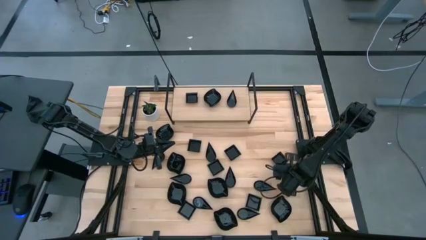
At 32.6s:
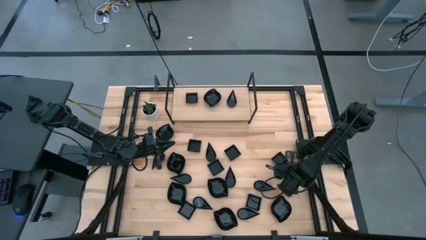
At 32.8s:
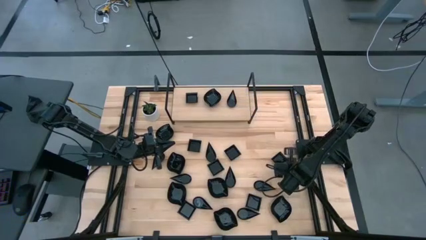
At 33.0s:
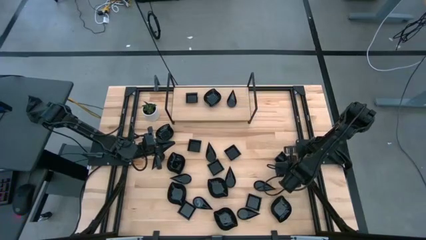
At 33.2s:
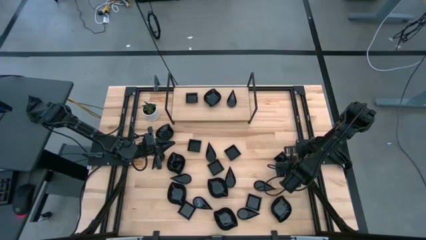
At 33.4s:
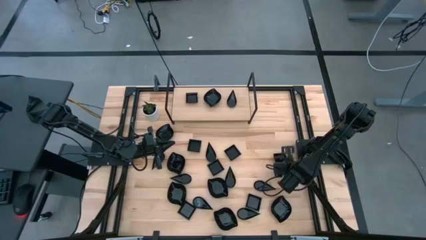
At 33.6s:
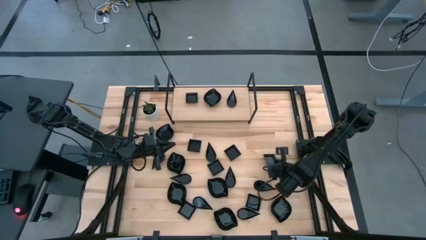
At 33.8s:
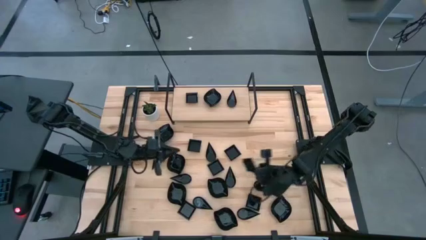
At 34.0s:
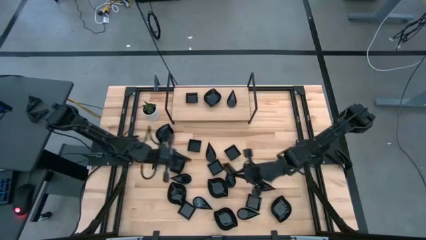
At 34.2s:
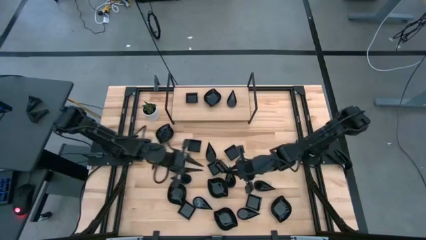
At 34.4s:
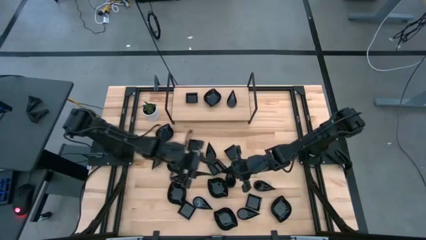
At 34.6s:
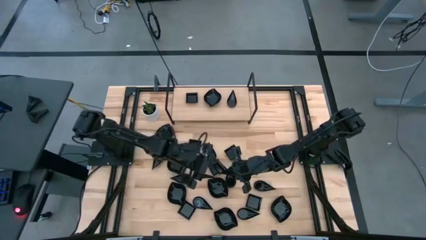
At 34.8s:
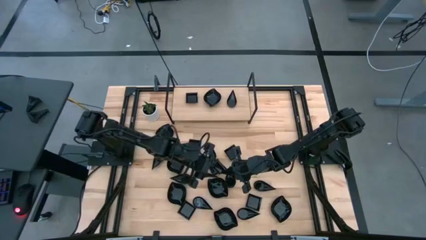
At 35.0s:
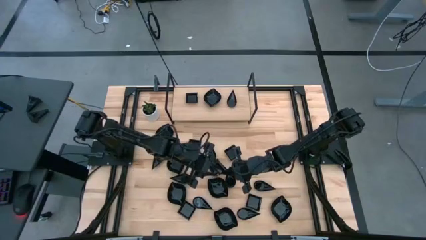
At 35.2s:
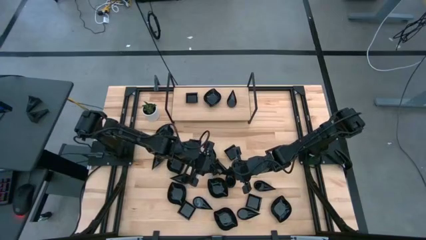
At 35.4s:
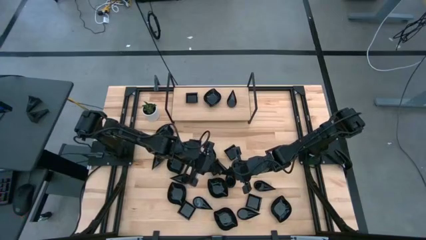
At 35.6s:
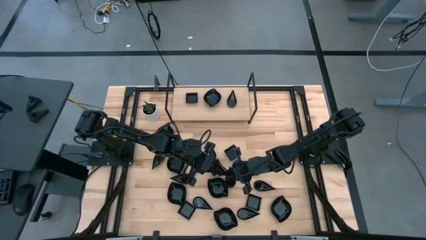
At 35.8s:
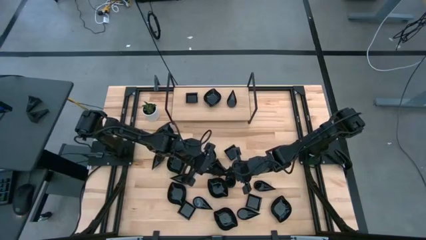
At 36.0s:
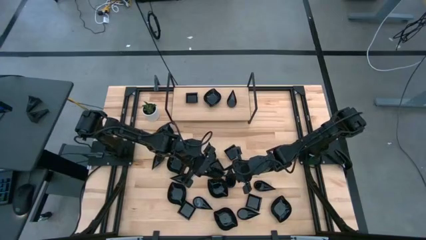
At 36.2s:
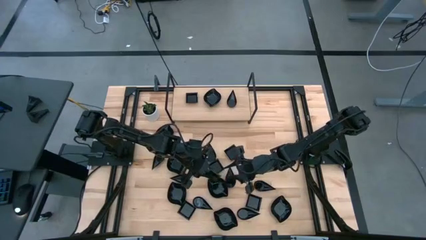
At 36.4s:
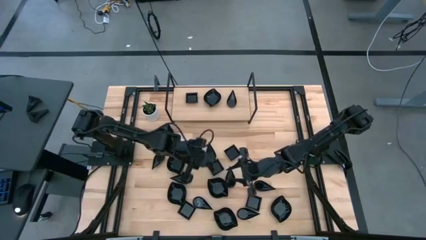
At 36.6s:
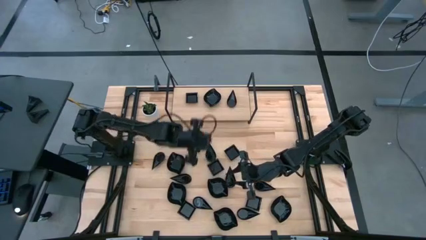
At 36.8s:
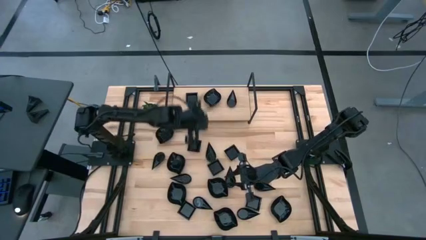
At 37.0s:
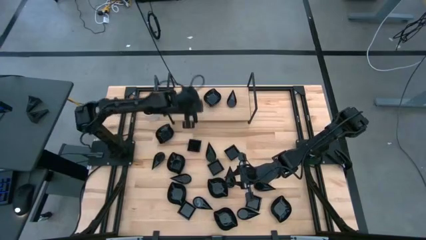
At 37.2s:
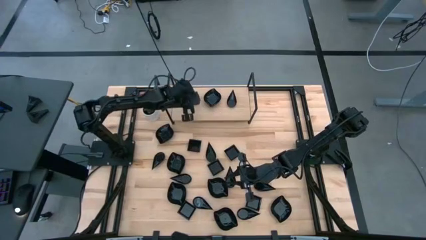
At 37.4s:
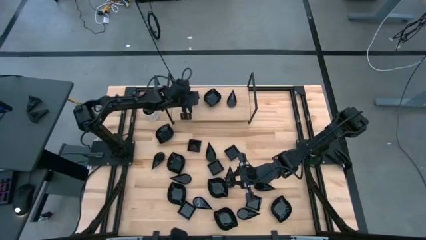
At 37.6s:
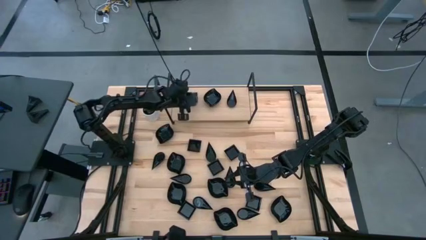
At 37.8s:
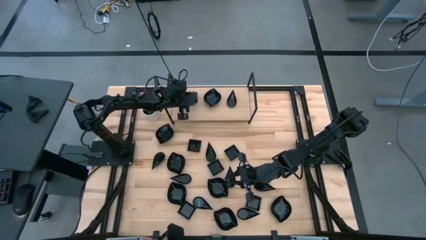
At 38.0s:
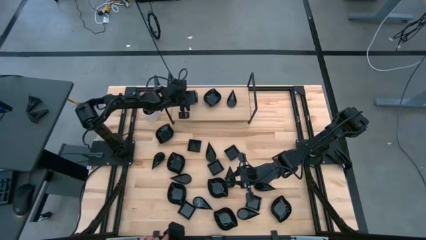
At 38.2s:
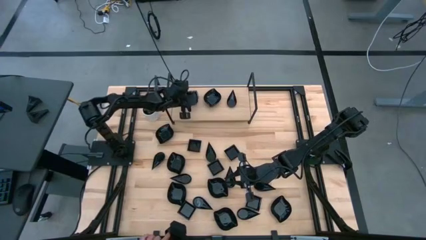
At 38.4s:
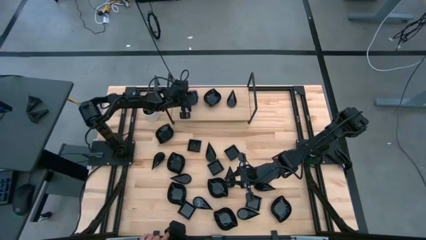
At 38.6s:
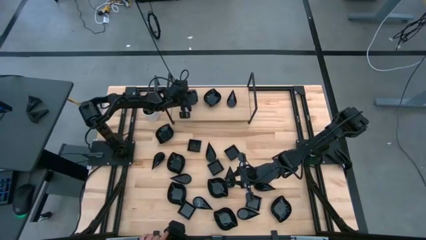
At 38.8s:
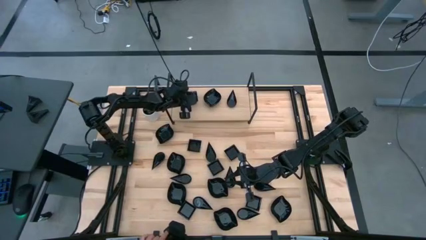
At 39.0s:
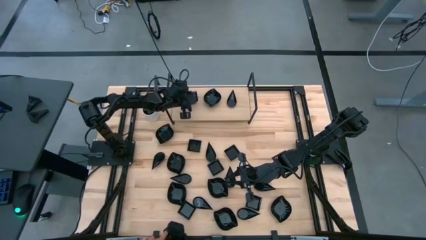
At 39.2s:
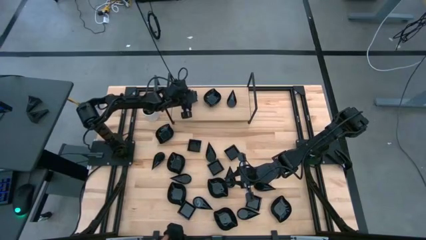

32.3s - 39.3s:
Task: Pick & Place Mini shaped plates
Stack the black square bowl on top of the other black square bowl on the shelf

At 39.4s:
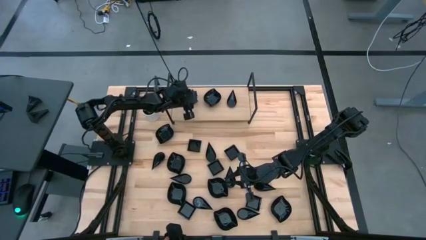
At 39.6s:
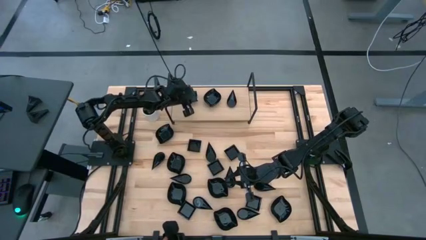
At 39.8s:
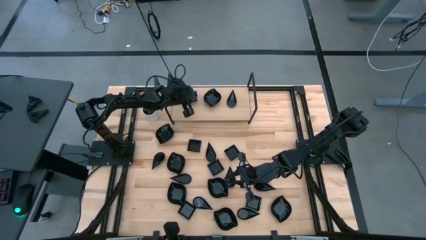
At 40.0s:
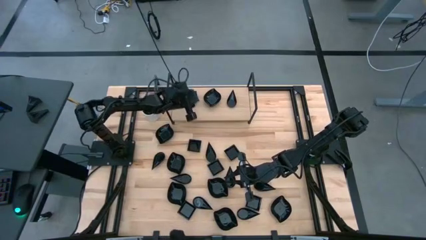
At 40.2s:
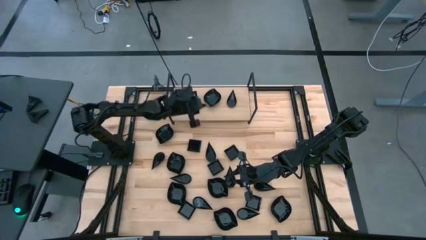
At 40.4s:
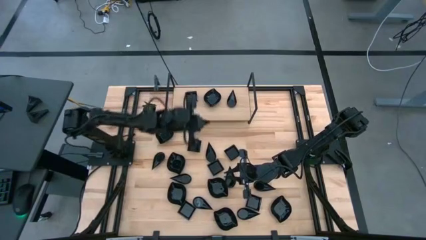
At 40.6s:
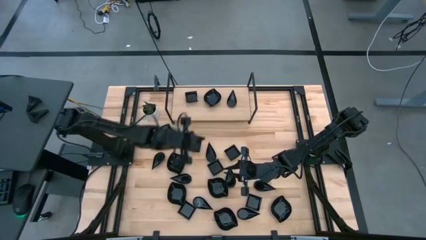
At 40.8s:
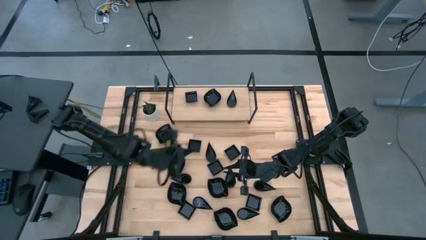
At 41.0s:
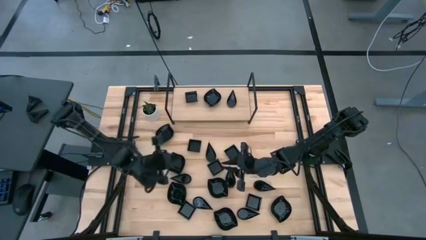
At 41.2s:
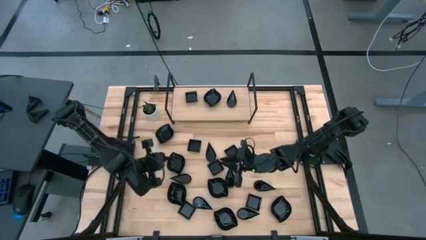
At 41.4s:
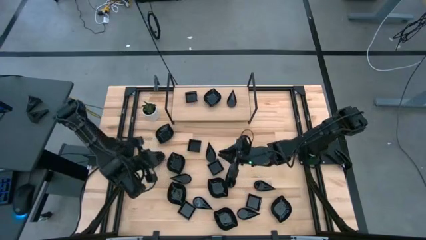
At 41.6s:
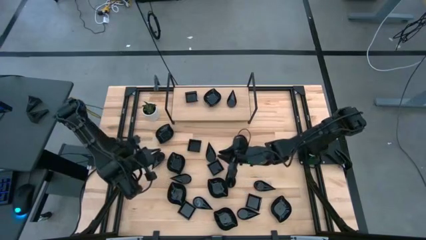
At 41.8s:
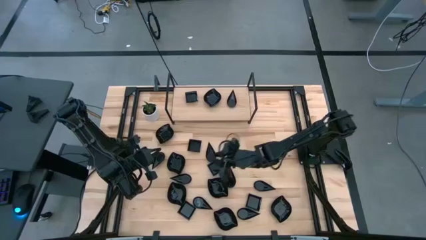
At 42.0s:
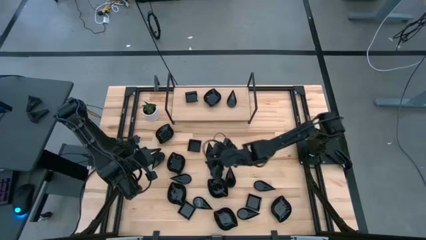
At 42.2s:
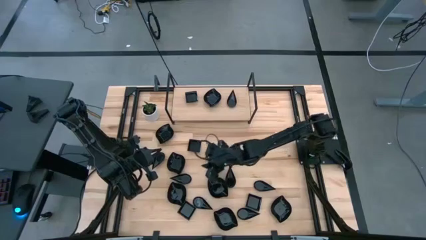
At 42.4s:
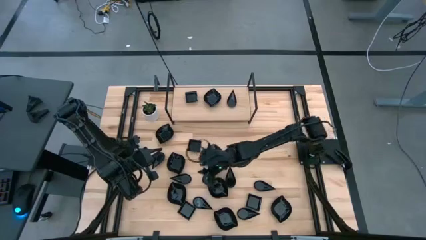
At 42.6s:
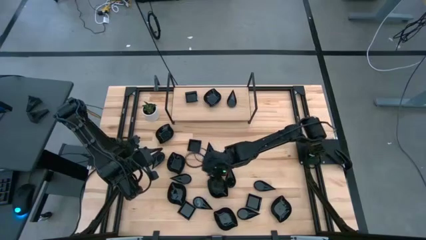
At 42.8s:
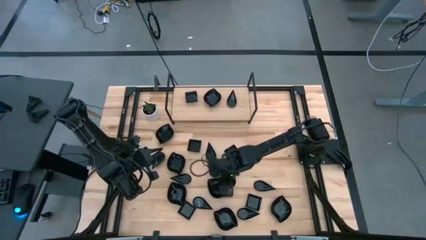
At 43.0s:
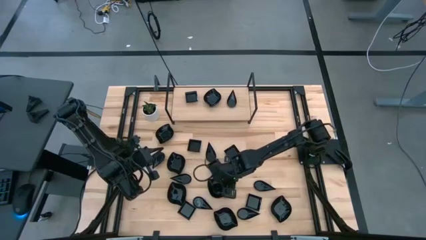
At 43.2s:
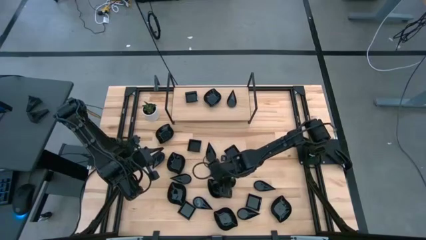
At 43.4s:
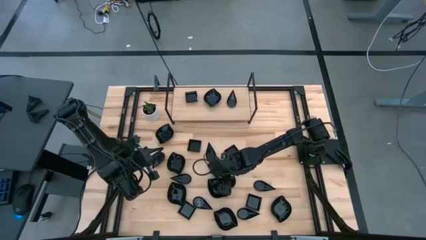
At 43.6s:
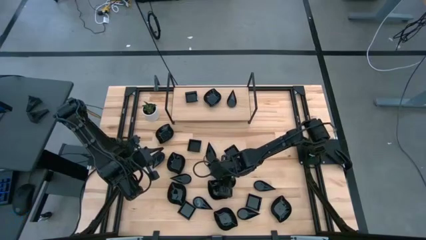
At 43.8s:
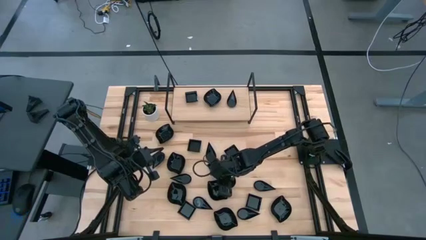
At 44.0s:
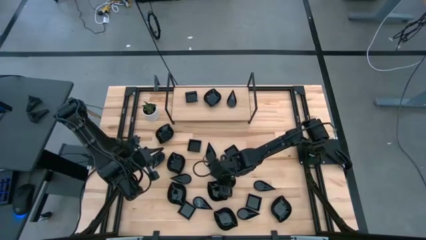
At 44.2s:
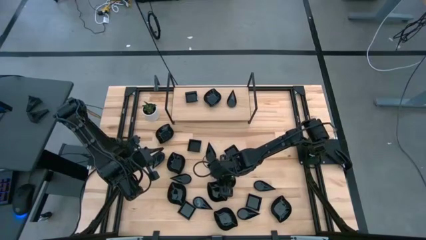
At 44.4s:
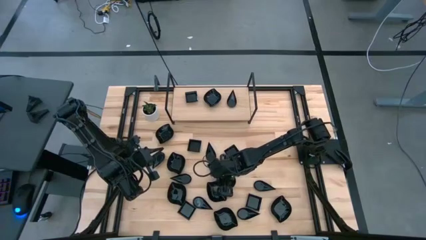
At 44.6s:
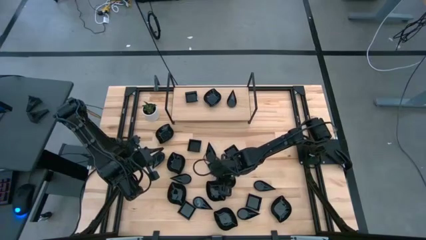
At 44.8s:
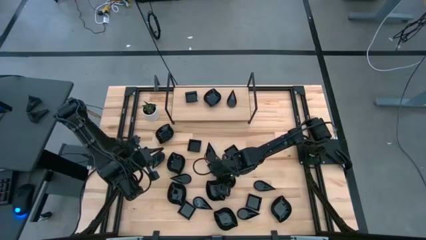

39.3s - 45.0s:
Stack the black leaf shaped bowl on top of the other black leaf shaped bowl on the shelf

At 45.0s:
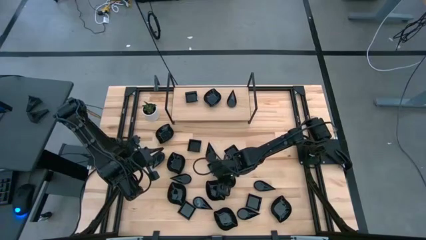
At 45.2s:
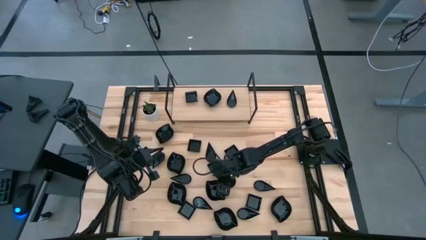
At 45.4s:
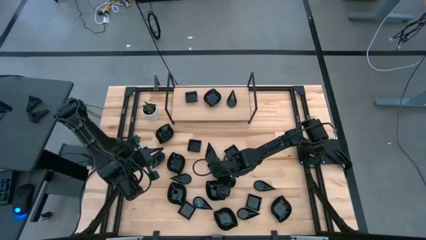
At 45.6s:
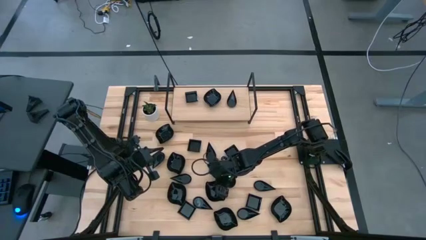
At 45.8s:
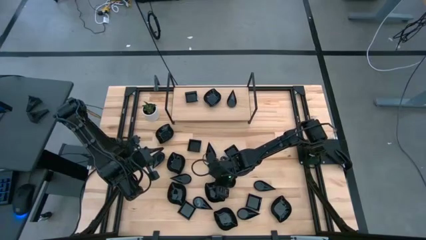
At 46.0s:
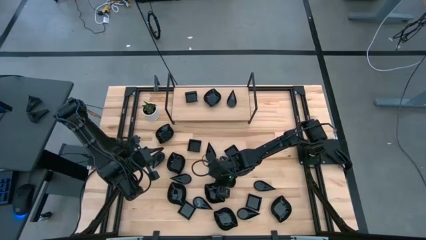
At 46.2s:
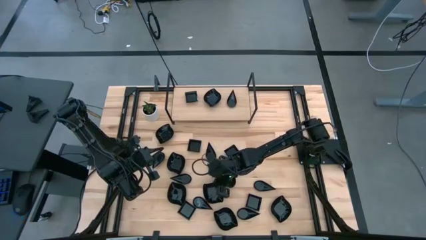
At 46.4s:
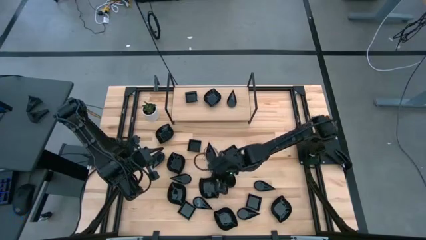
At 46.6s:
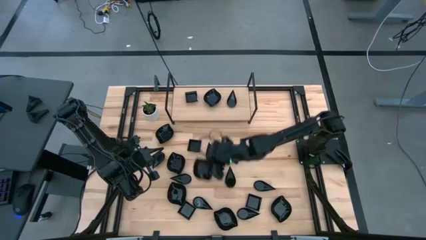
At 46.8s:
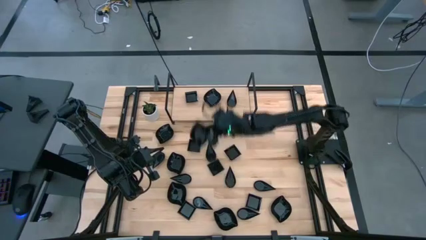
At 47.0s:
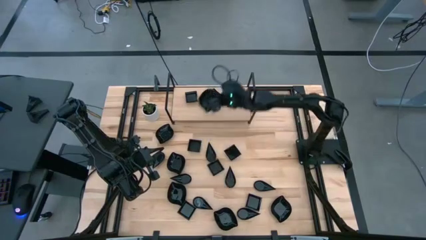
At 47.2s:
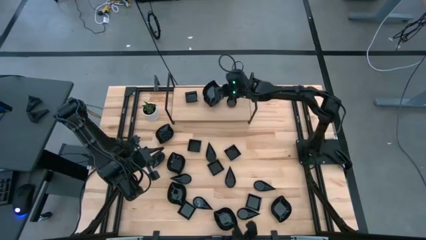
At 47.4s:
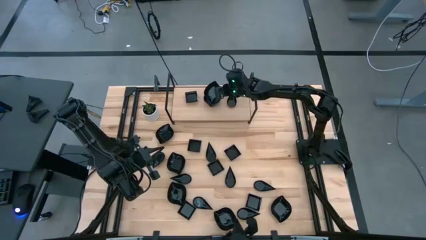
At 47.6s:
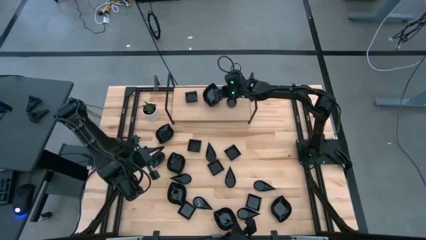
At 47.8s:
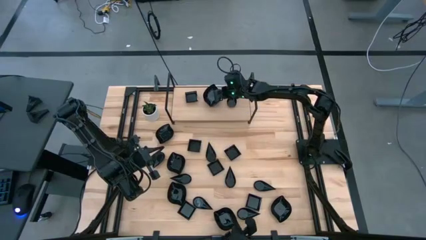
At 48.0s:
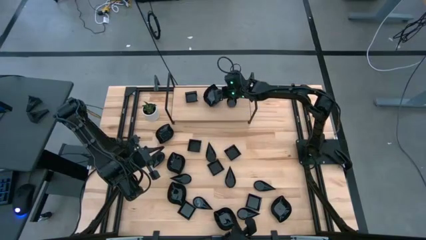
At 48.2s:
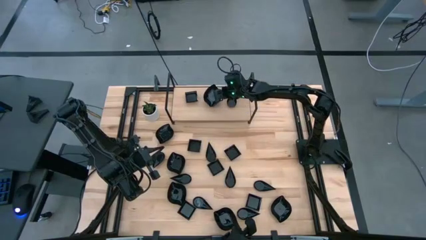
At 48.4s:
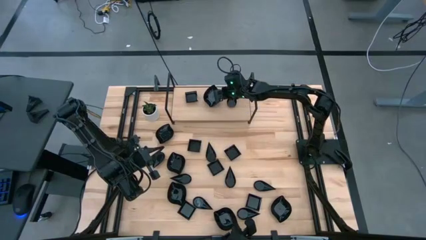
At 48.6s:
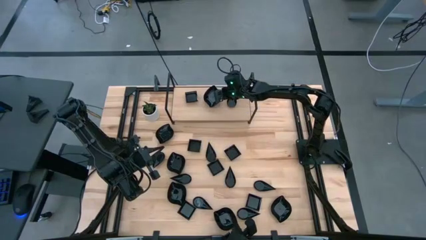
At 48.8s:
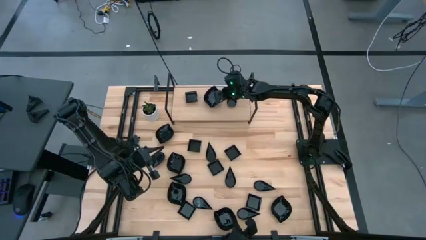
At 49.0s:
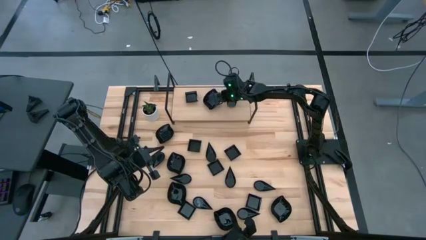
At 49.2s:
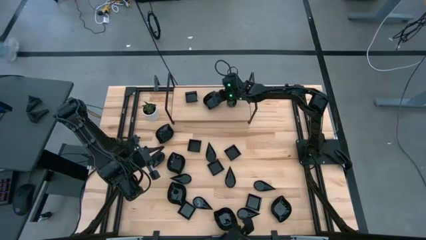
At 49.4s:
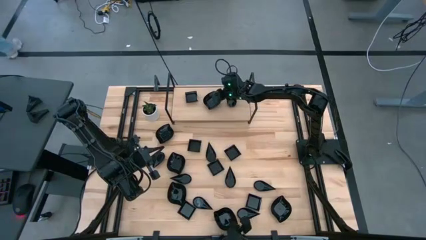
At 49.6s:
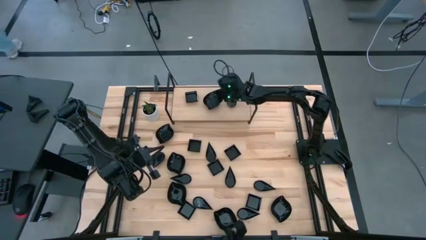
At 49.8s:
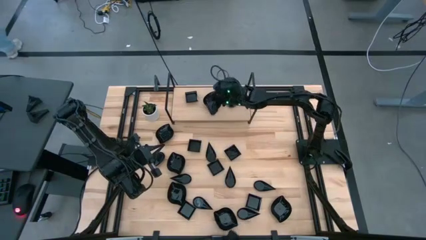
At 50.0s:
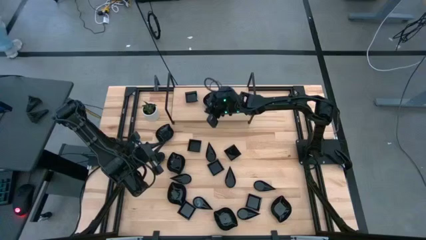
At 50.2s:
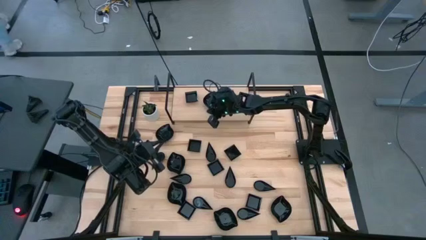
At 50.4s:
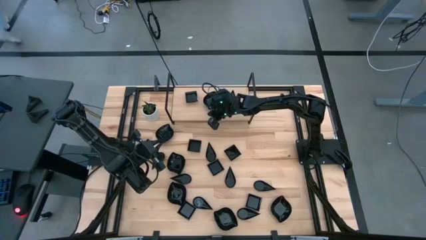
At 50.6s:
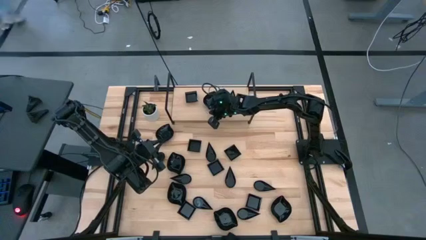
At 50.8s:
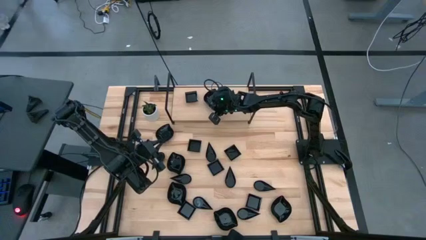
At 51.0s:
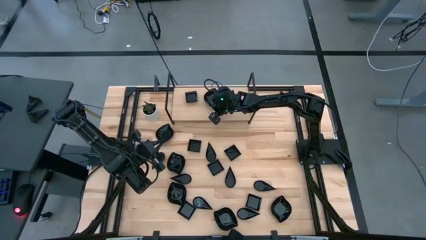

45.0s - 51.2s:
Stack the black leaf shaped bowl on top of the other black leaf shaped bowl on the shelf
